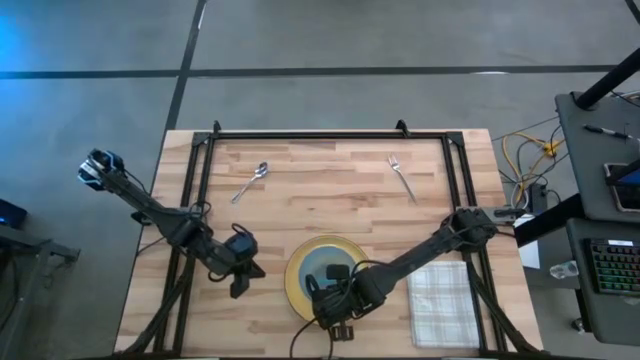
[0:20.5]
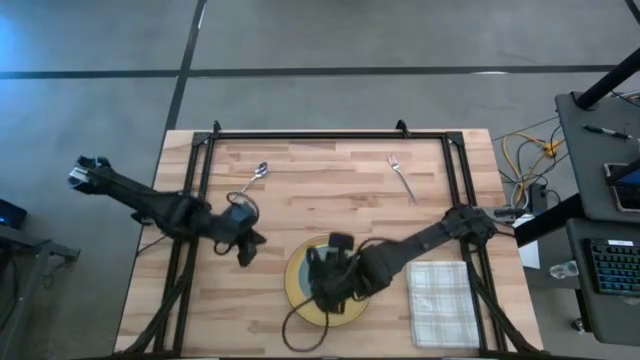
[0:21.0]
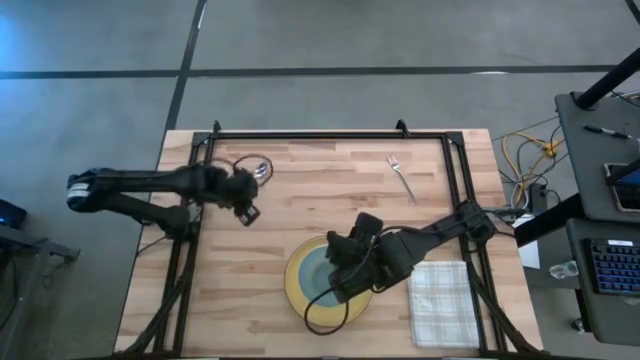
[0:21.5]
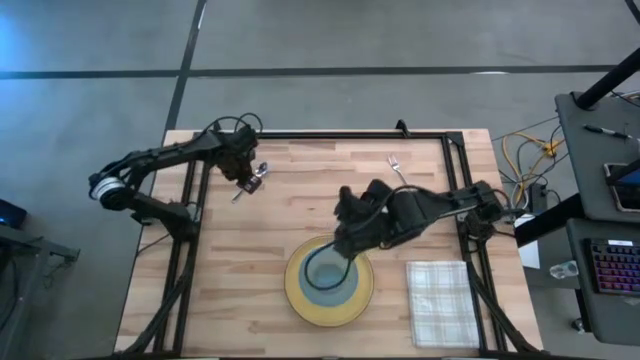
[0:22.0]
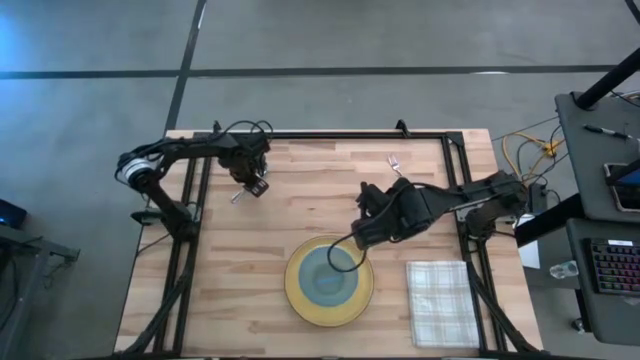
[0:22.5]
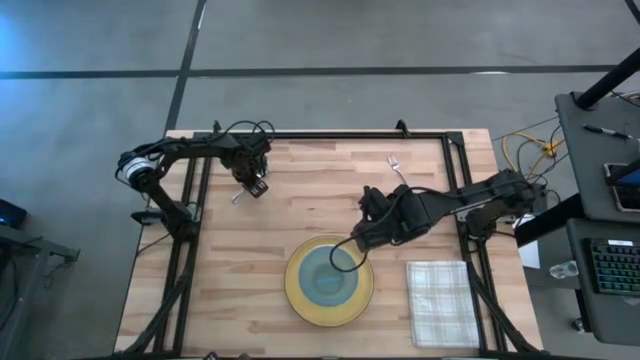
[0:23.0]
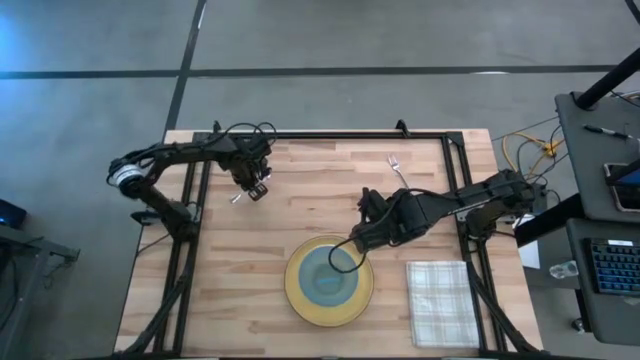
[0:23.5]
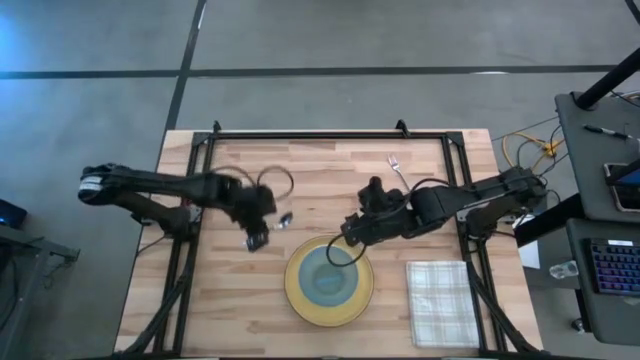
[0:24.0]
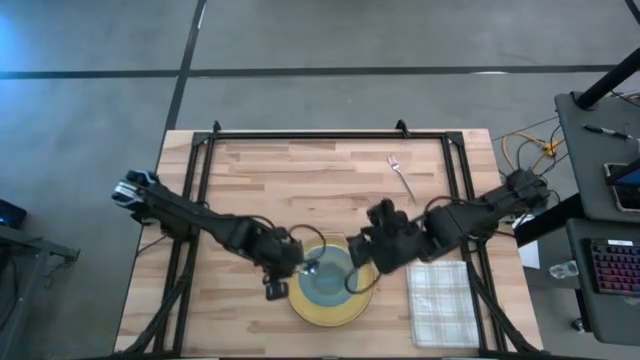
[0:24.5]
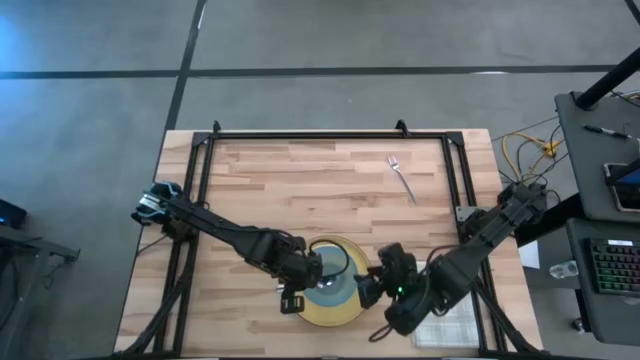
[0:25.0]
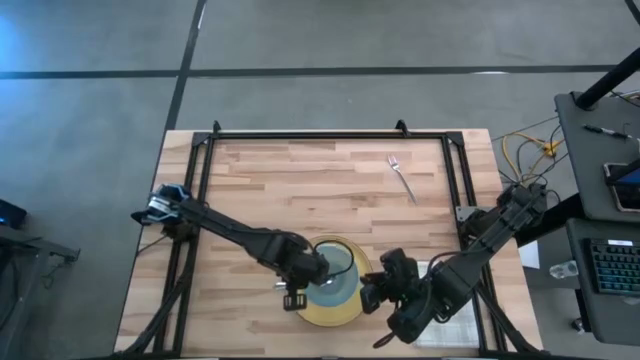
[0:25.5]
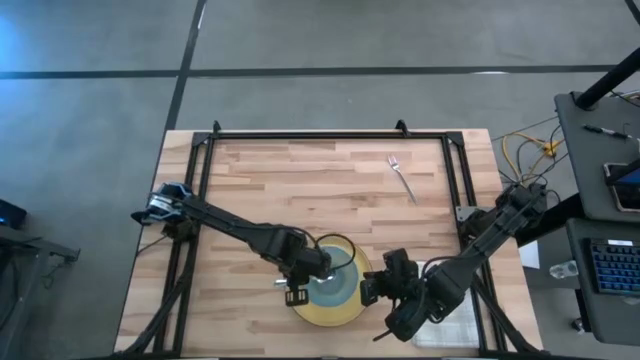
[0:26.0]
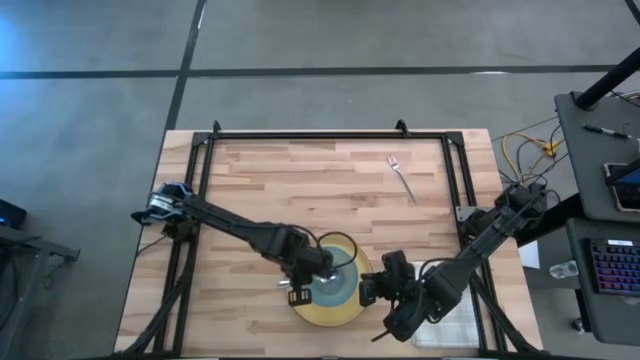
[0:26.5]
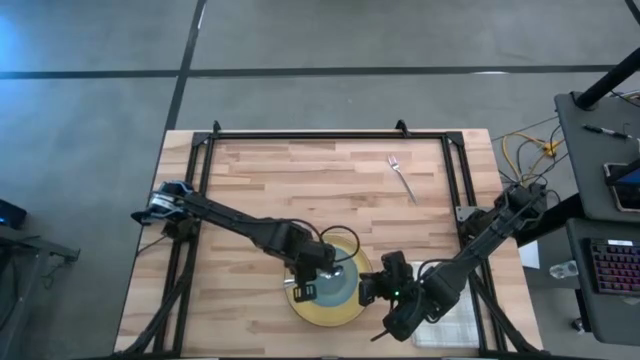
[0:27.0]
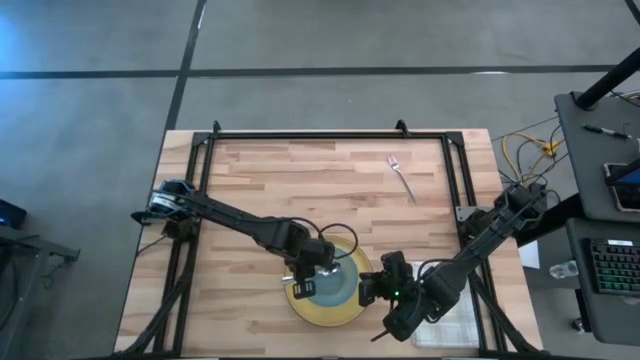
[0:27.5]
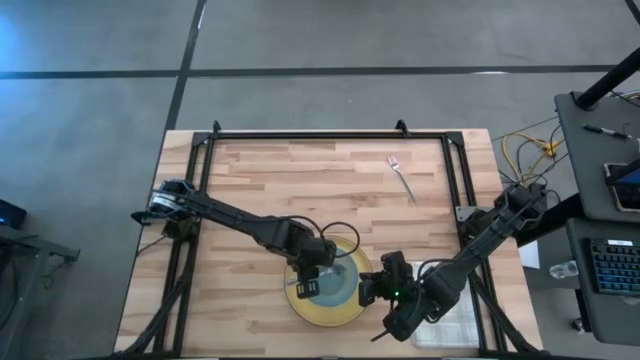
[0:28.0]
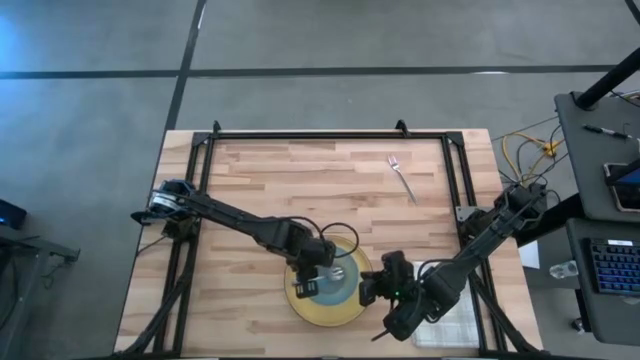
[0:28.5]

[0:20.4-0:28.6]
Task: Set table place
Put the silver spoon into the blue bowl

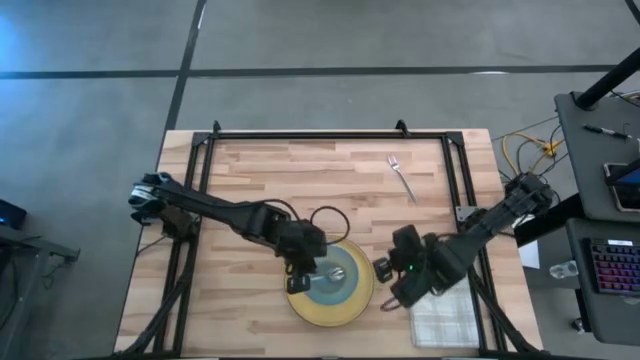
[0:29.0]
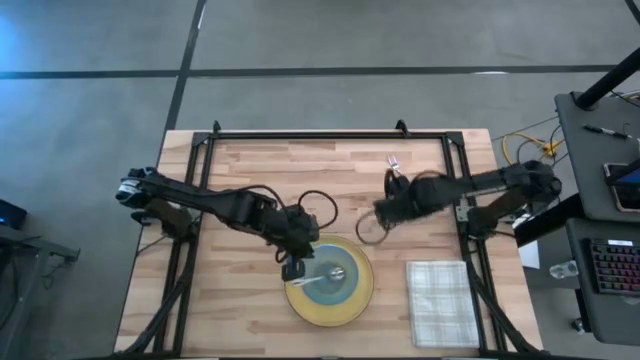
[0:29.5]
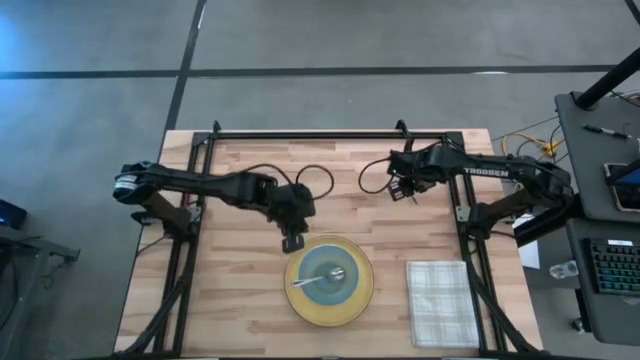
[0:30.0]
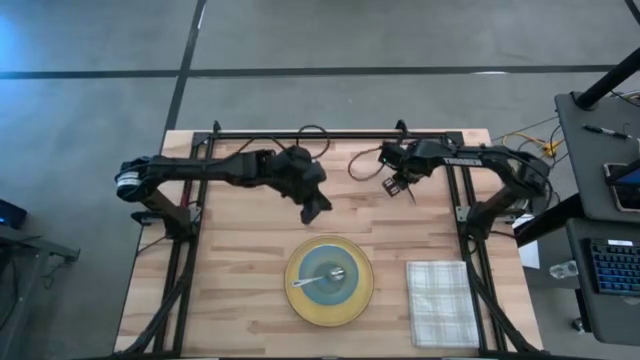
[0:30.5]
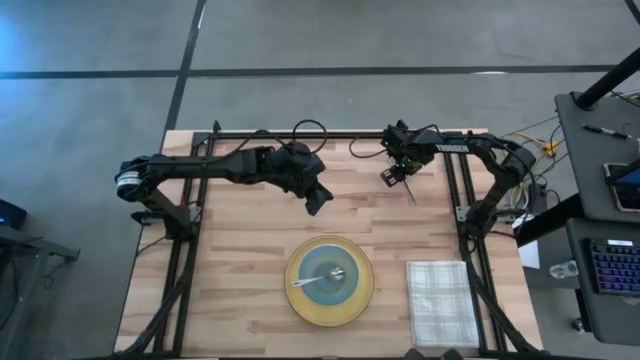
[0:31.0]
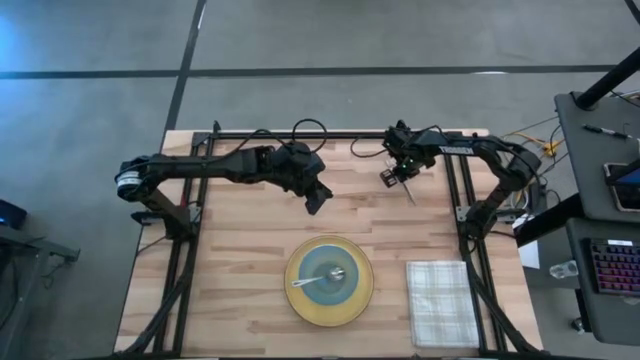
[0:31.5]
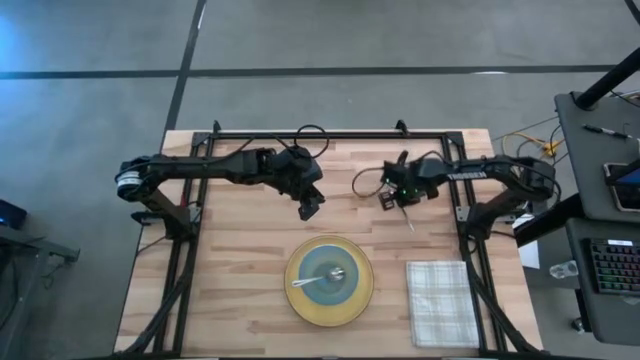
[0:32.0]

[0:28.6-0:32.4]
Put the silver fork to the right side of the yellow plate

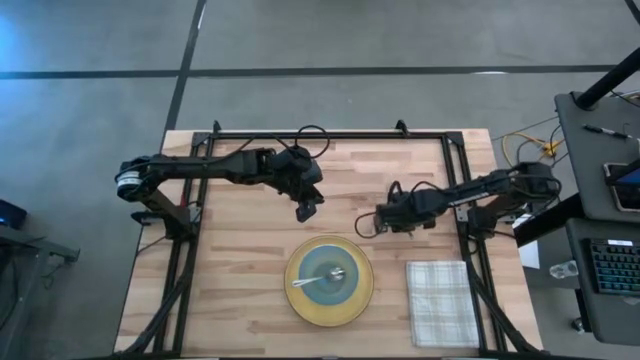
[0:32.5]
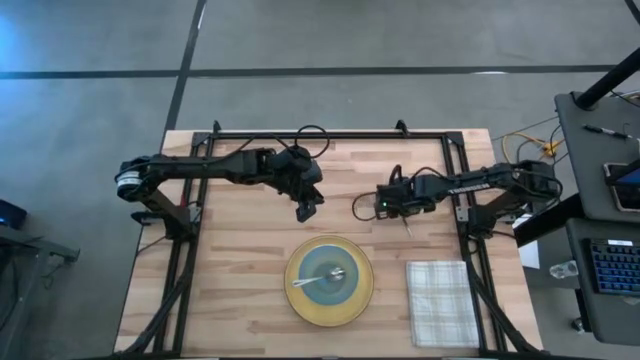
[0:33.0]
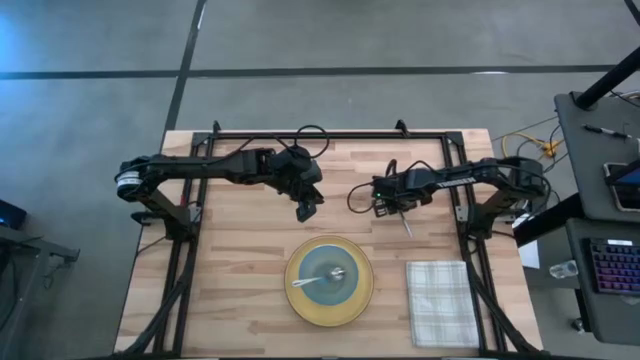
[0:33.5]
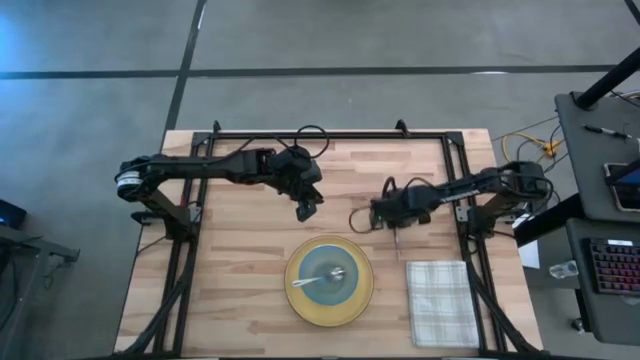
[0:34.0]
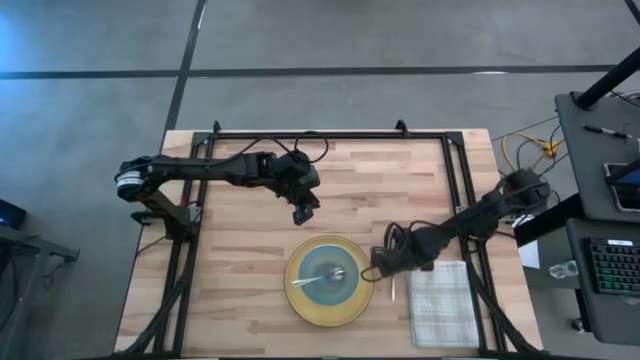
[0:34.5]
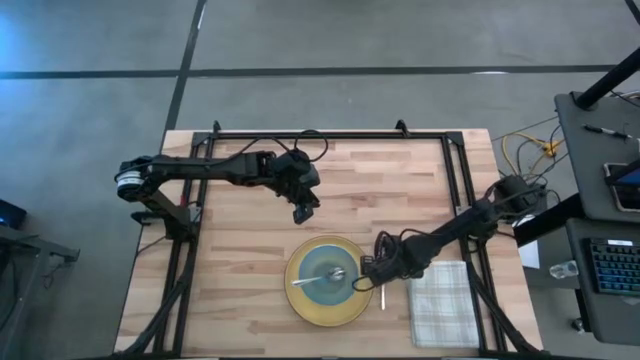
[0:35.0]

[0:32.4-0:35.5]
Put the silver fork to the right side of the yellow plate

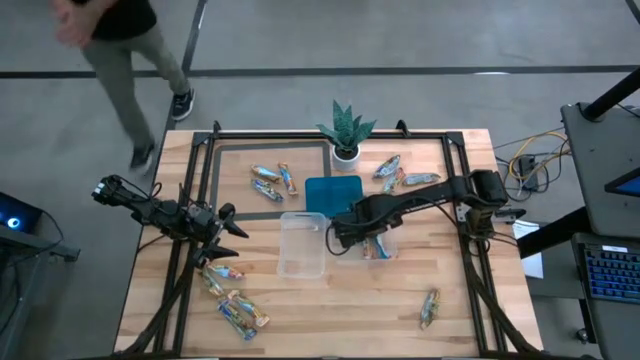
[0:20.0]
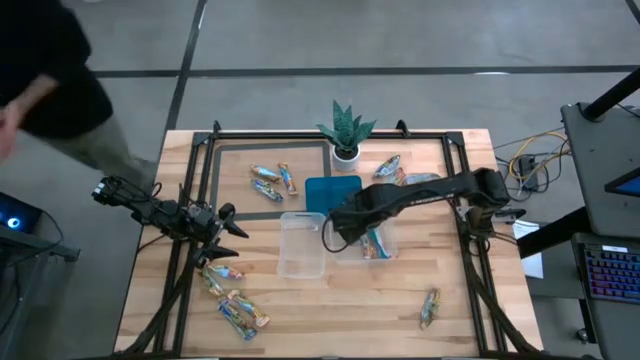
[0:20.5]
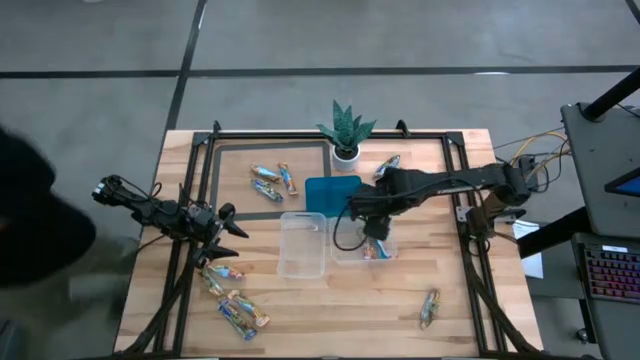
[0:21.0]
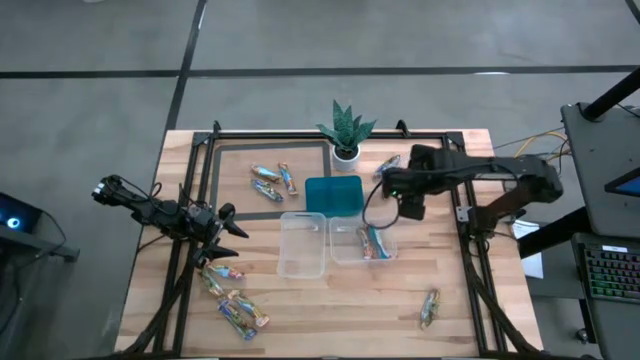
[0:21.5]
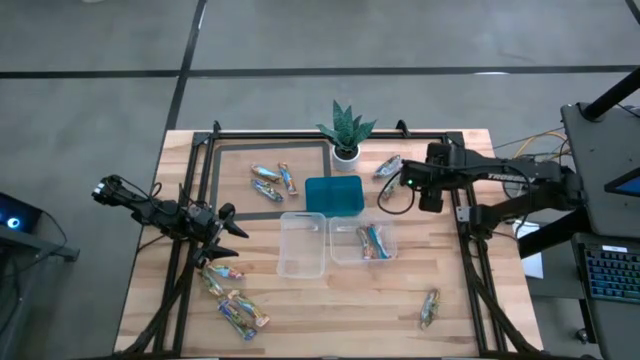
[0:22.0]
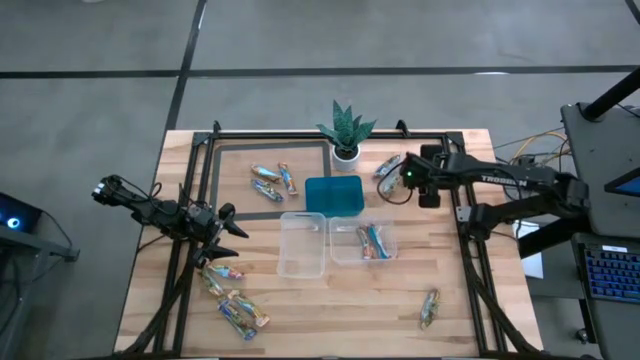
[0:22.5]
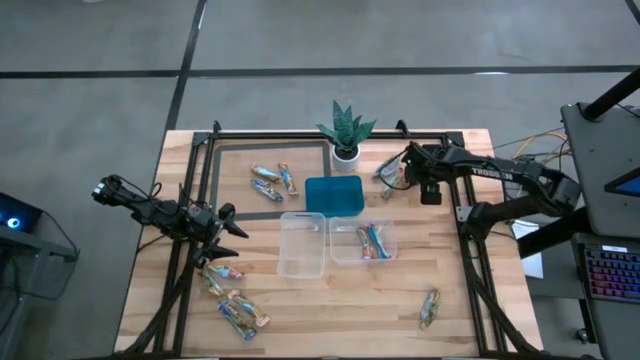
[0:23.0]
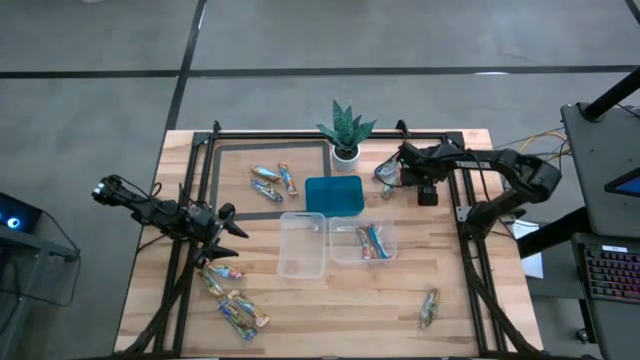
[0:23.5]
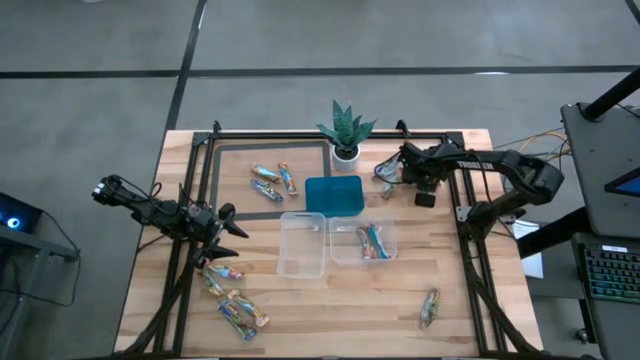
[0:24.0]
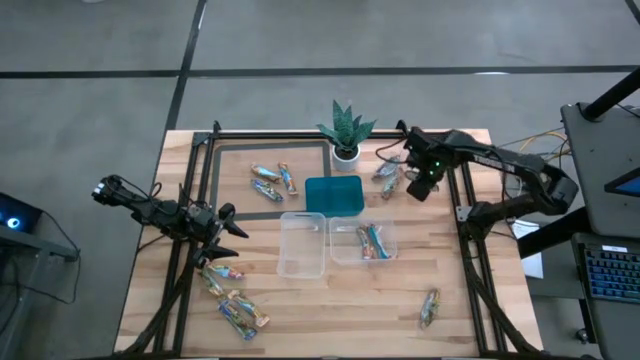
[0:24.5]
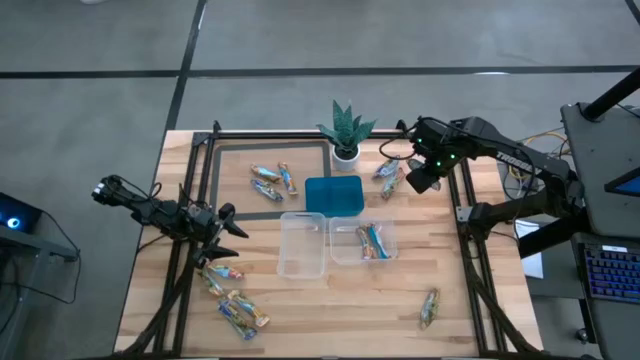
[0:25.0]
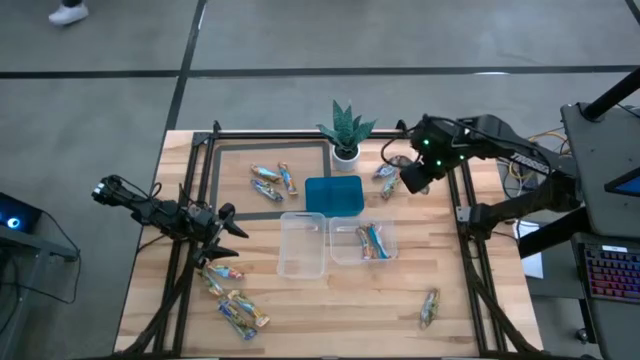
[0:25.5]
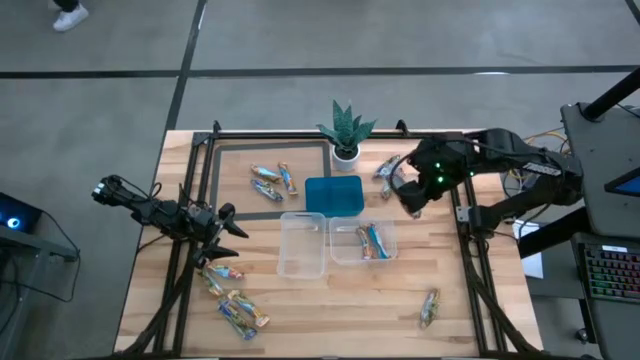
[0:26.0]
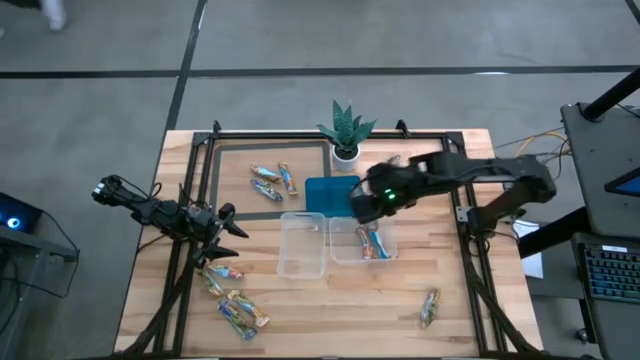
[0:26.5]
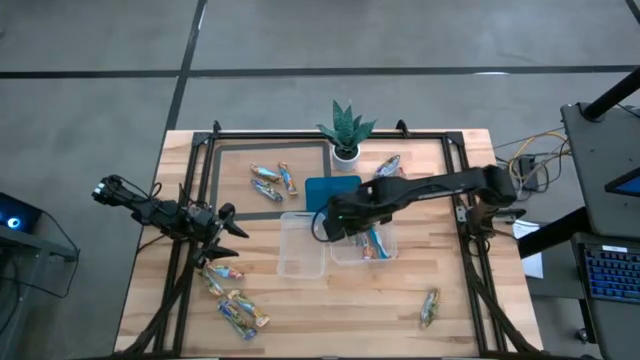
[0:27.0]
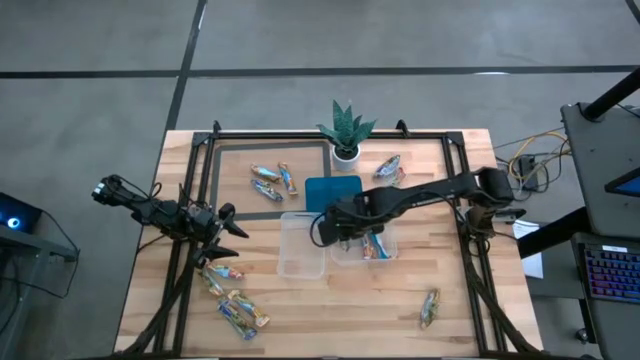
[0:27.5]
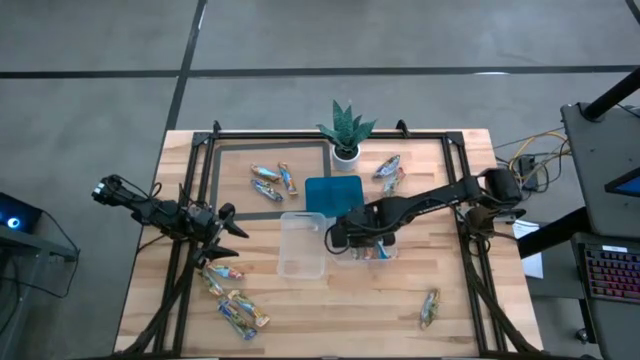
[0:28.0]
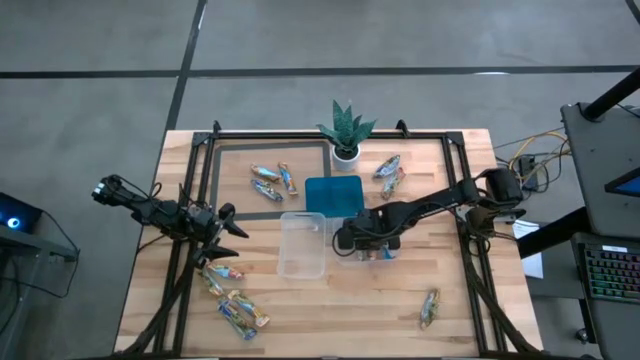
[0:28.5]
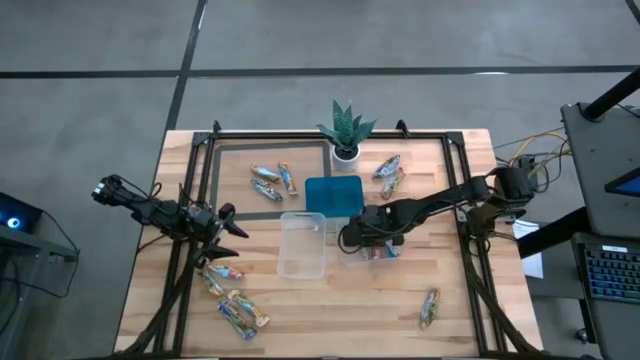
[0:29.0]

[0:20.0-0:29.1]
Task: Pick and place Granola Bars by type
Put the red granola bar into the right transparent bin
